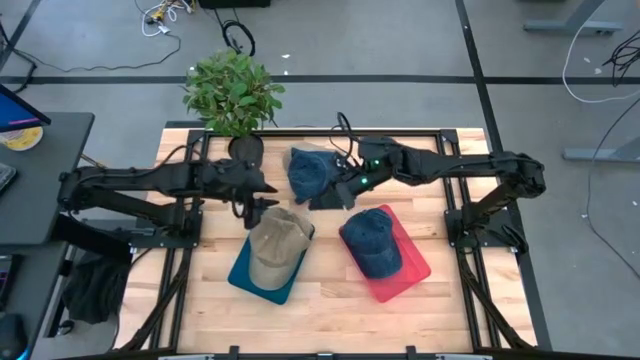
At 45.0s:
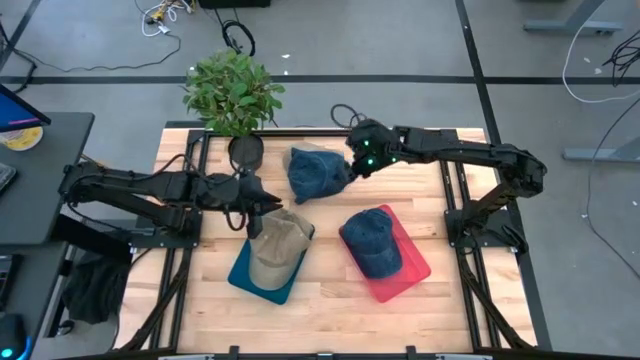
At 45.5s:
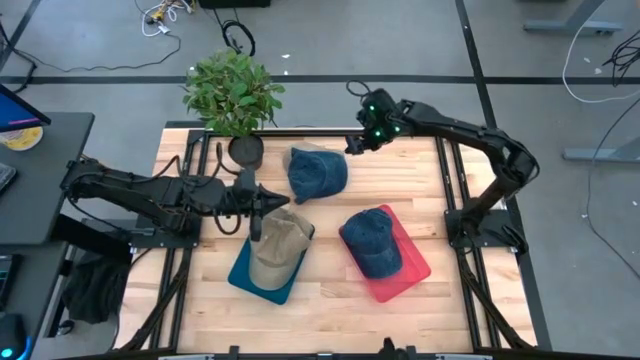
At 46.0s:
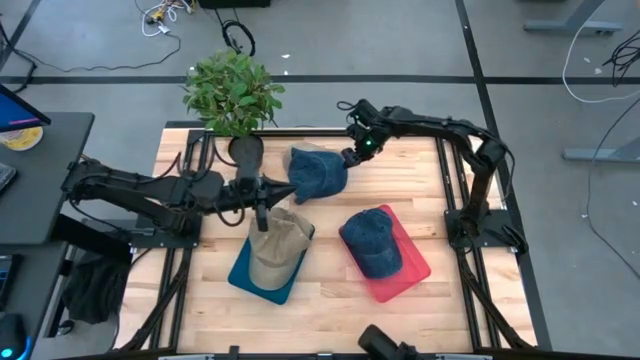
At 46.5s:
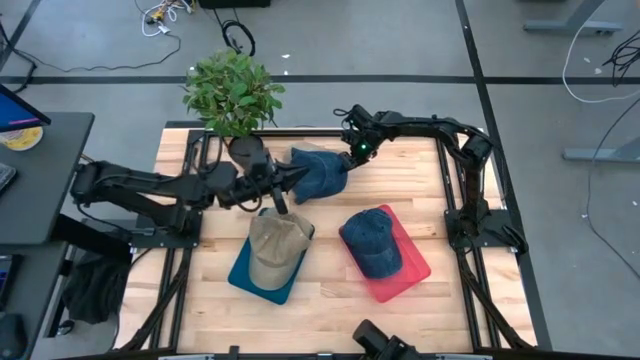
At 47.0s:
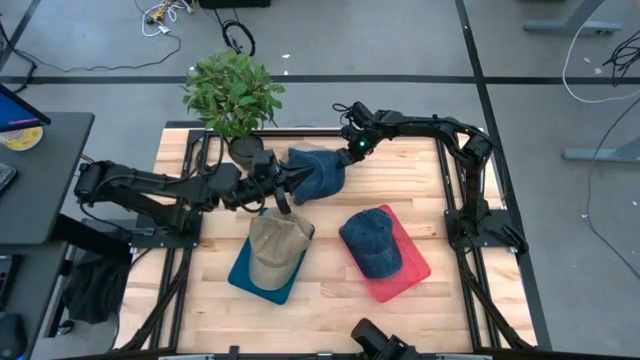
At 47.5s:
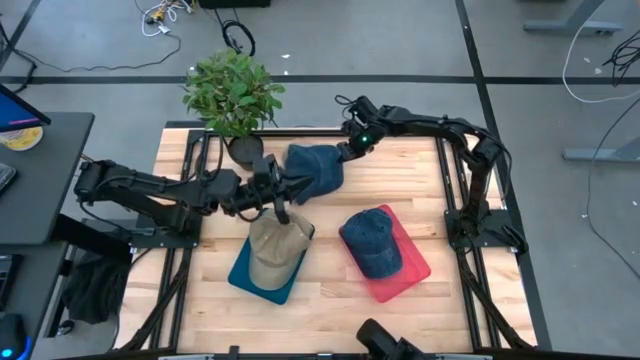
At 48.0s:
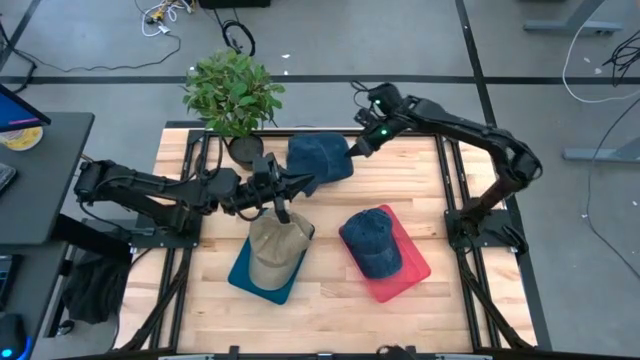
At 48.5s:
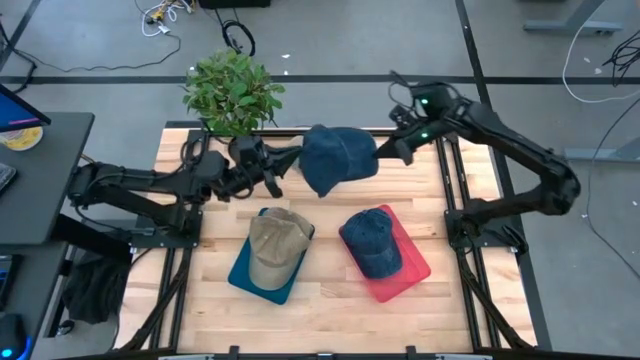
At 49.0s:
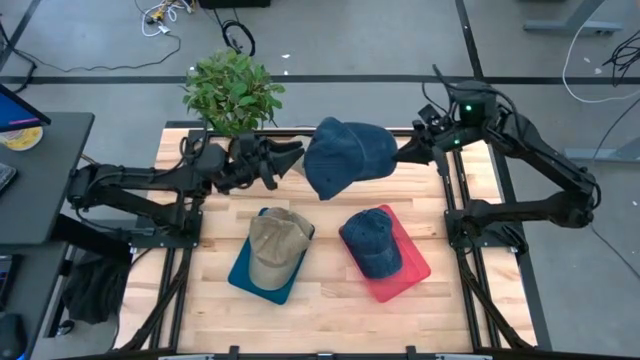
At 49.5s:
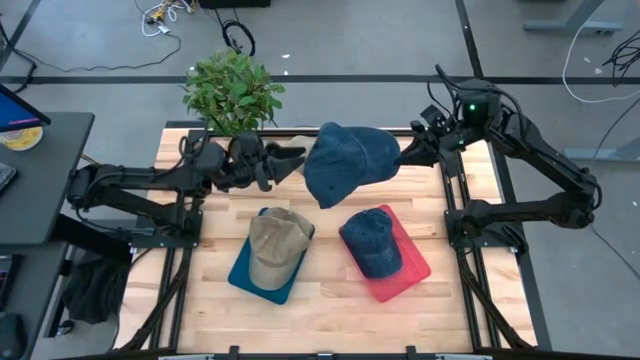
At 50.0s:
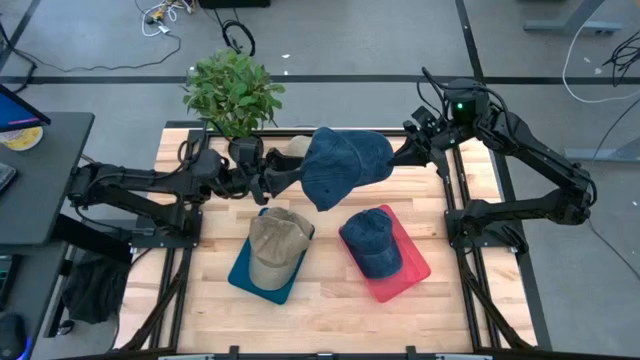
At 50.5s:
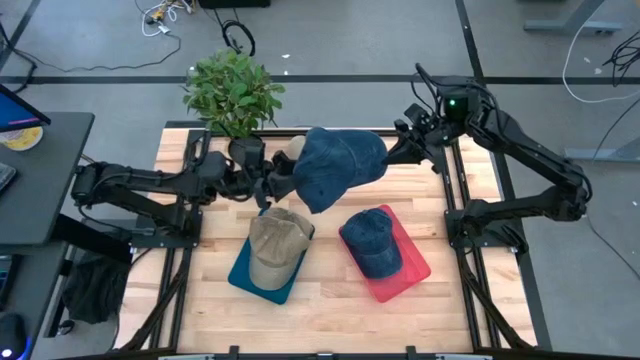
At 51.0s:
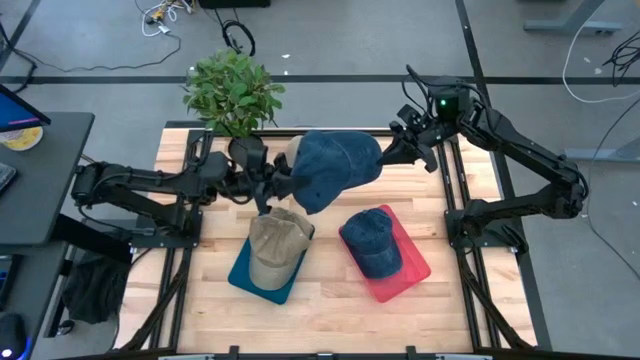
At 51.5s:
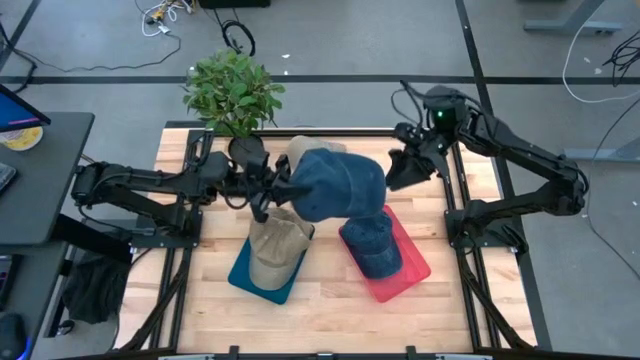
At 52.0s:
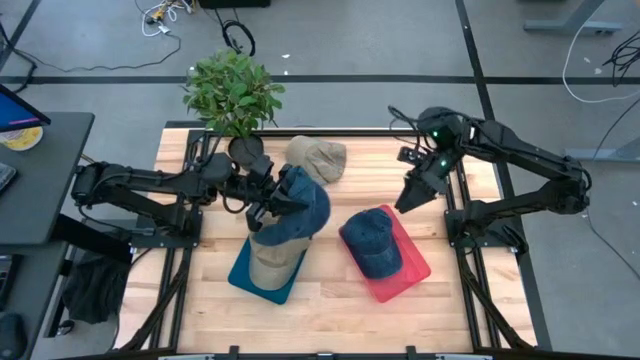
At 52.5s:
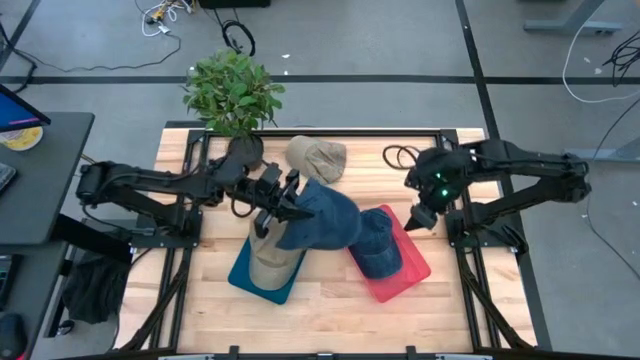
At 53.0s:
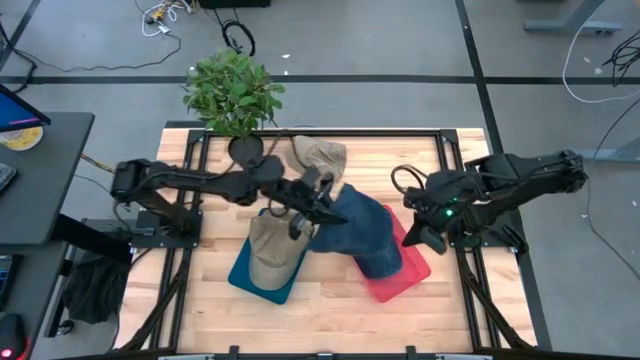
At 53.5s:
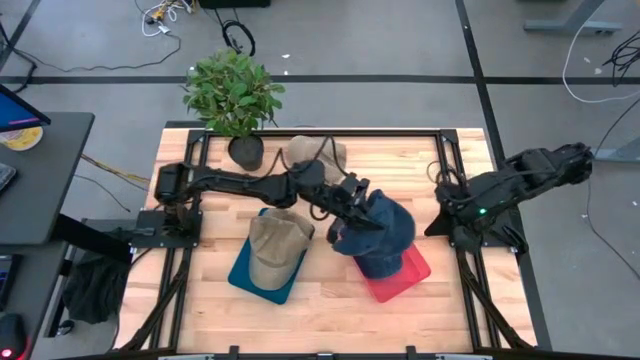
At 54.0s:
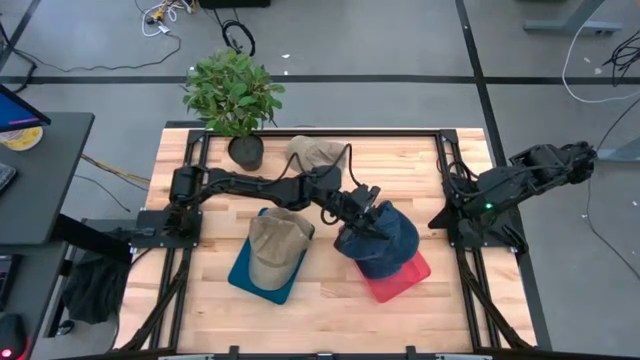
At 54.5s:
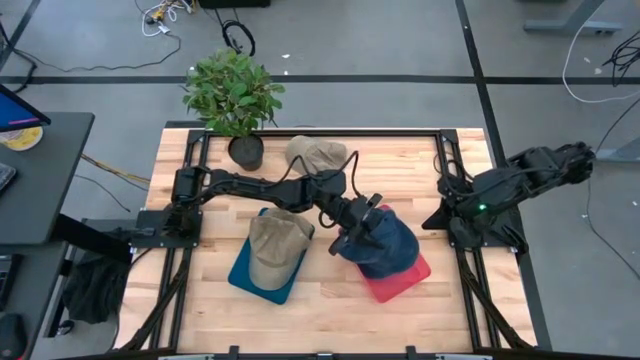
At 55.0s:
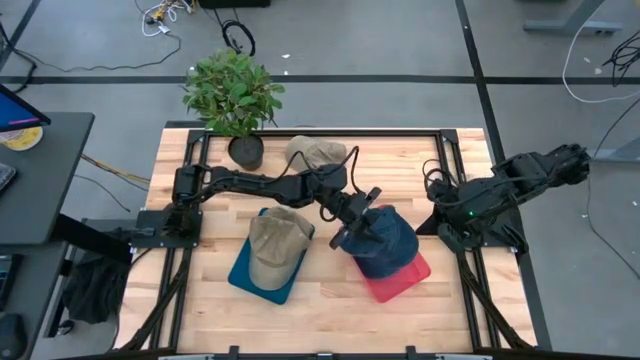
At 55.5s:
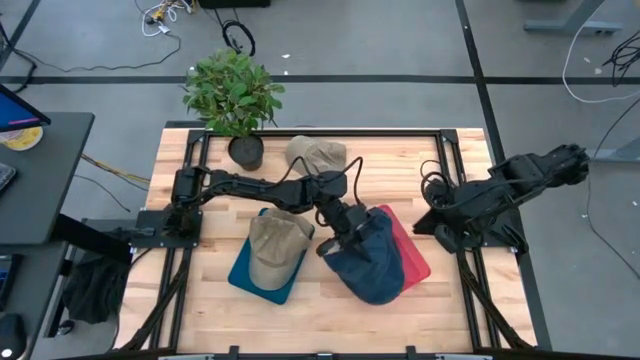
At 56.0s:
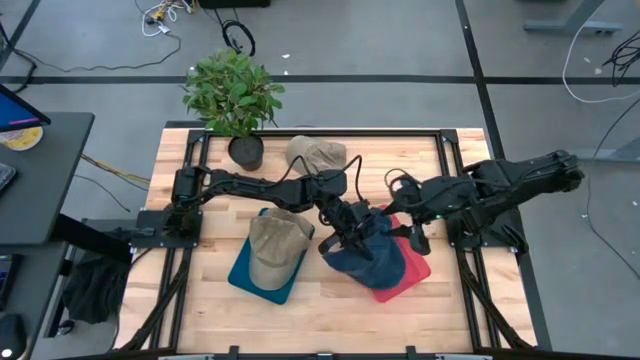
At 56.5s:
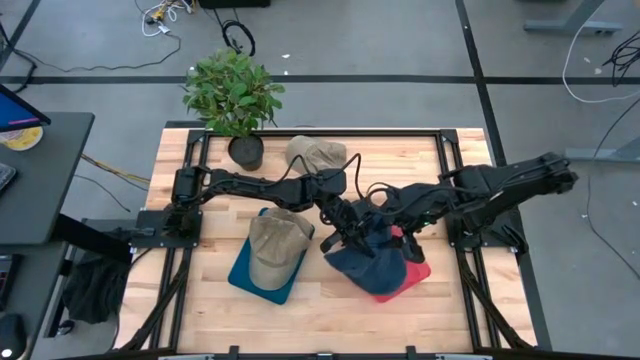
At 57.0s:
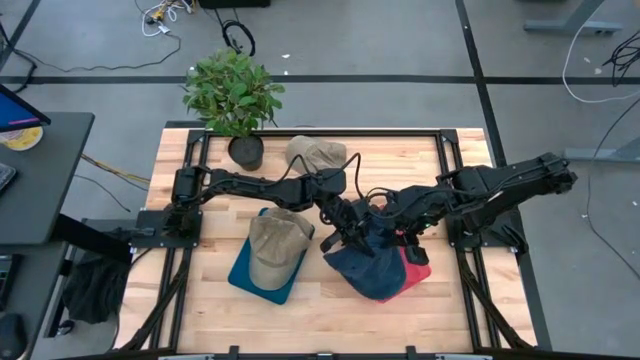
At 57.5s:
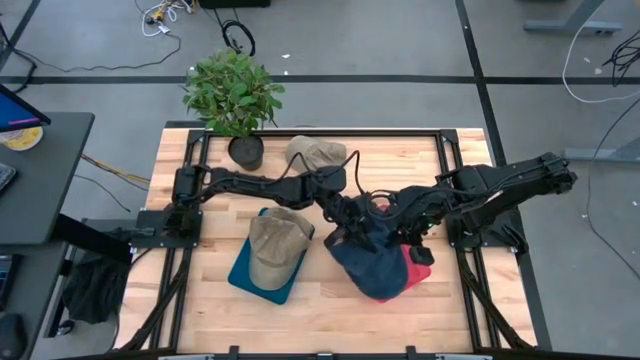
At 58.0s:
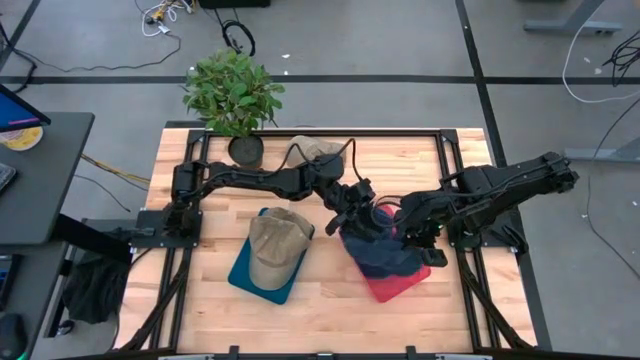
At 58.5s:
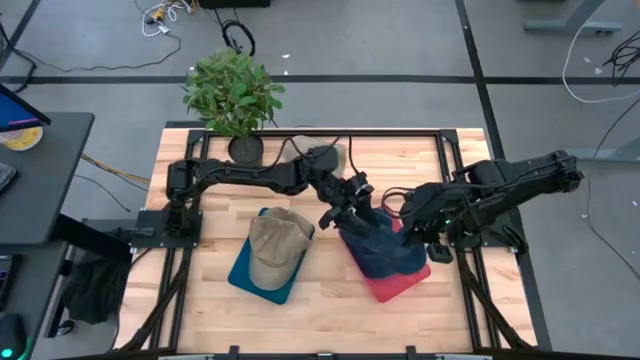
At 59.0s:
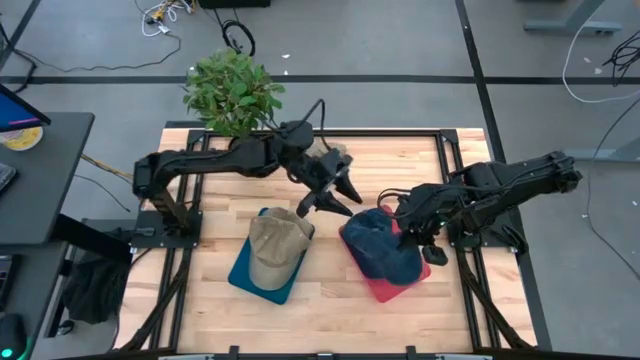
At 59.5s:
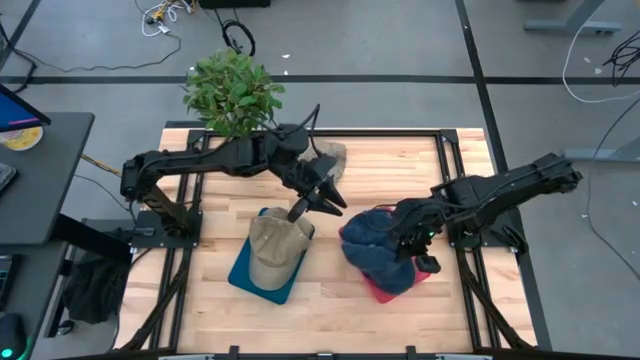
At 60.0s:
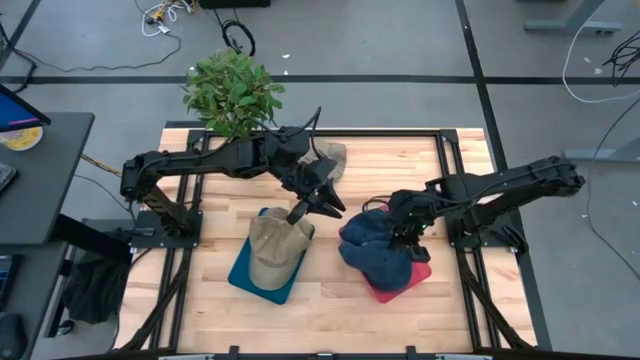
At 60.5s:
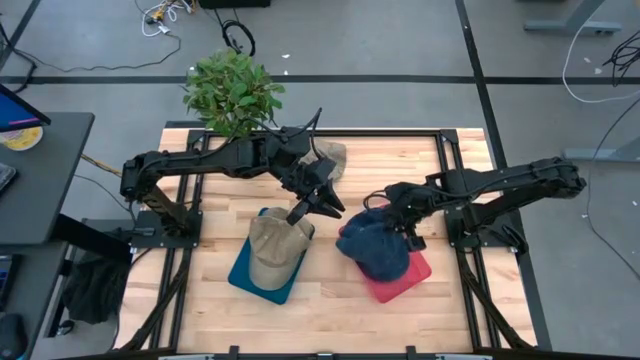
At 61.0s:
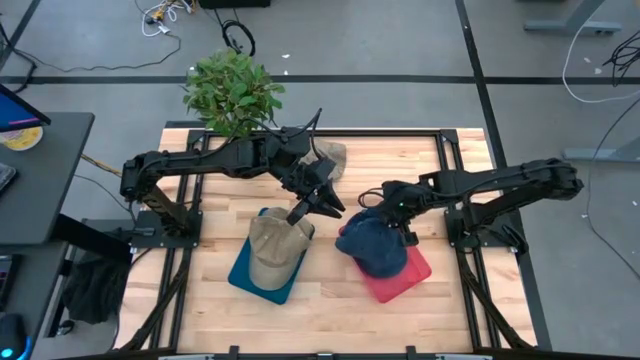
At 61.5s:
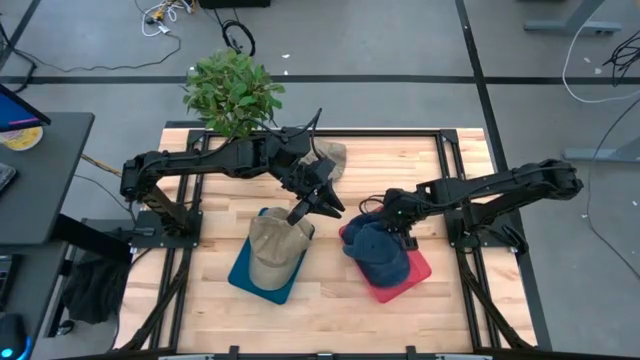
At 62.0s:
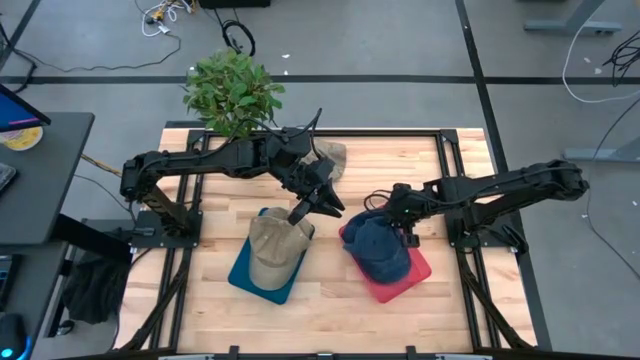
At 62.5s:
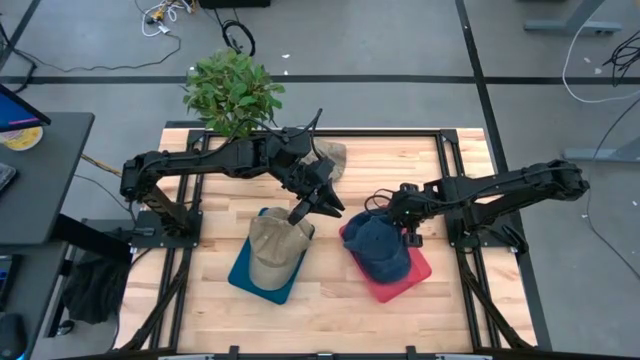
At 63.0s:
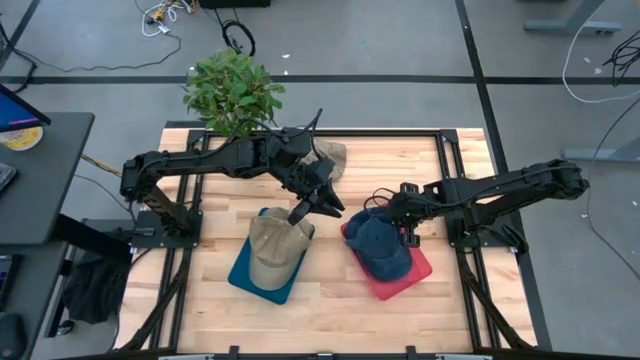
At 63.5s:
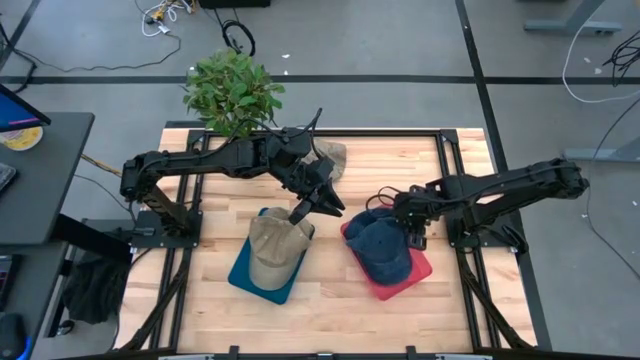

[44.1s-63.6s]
Task: Pick & Place hat
Put the blue cap into the red bin

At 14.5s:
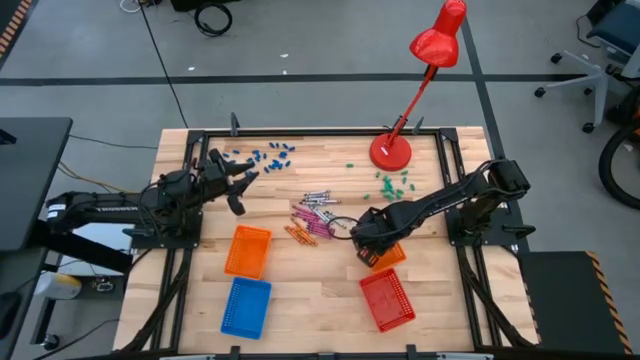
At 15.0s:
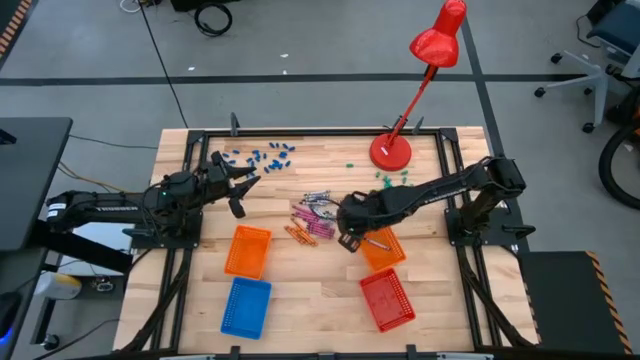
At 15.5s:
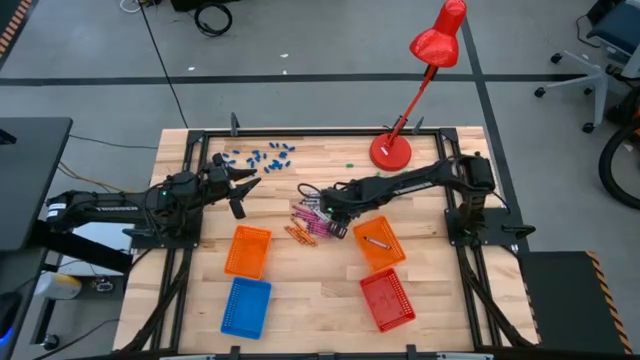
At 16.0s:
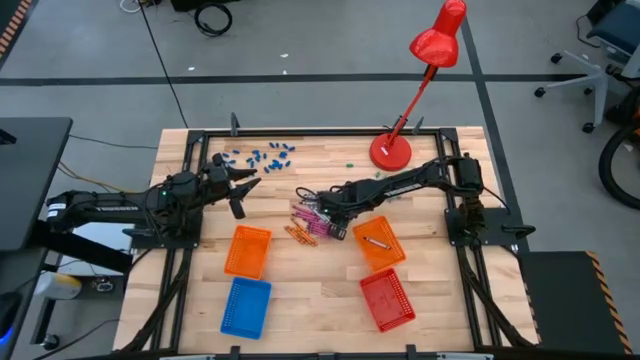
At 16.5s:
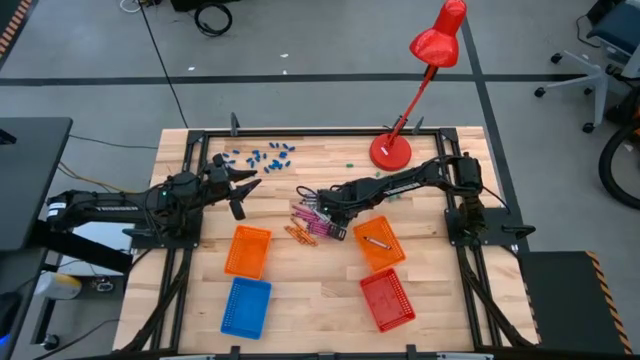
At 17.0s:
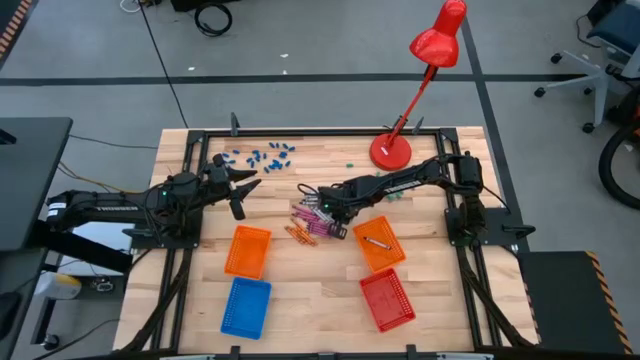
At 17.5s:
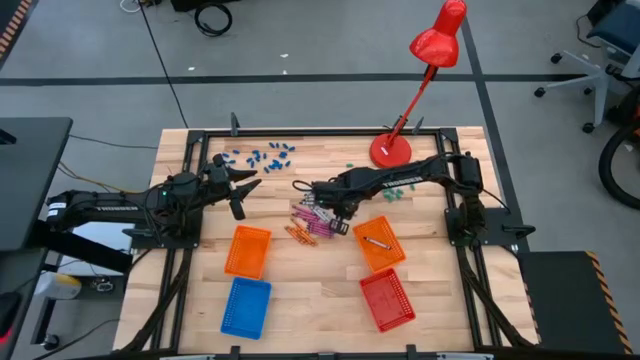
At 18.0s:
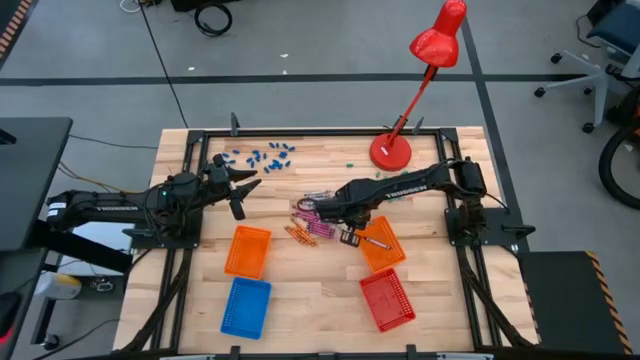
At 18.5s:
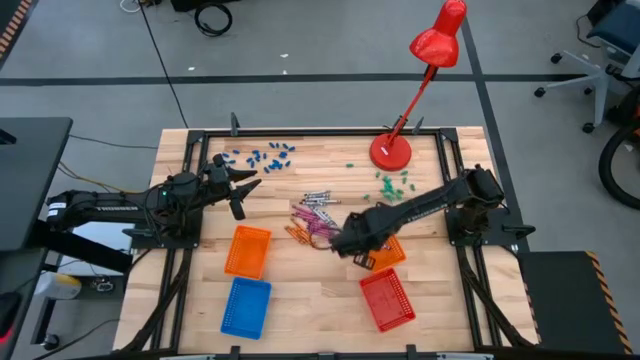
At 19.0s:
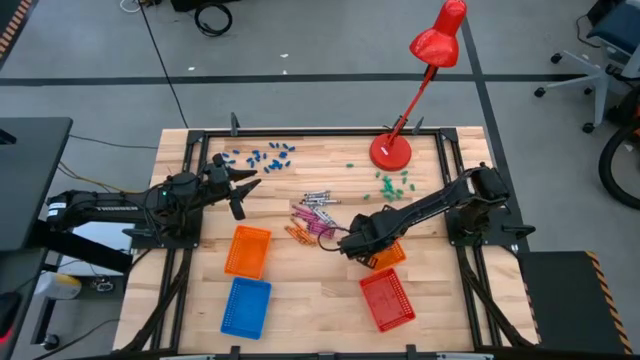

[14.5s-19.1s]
Task: Sort crayons
Put the black crayon into the right orange bin
